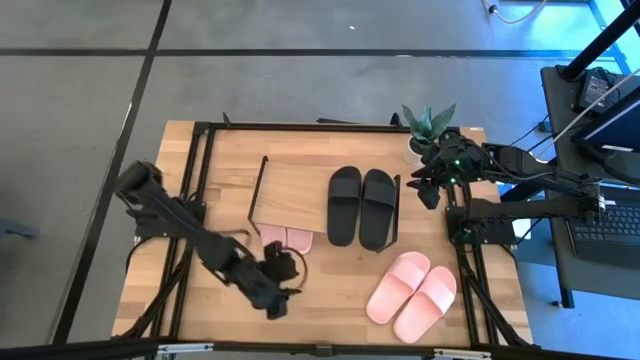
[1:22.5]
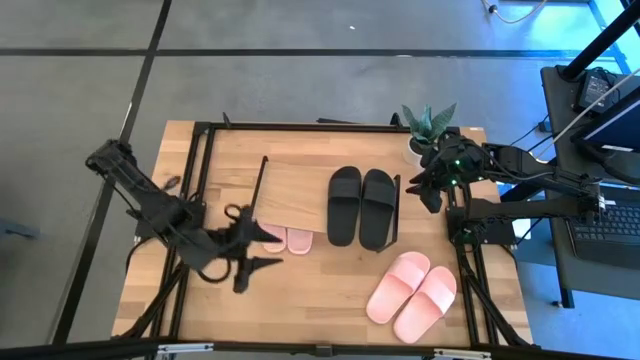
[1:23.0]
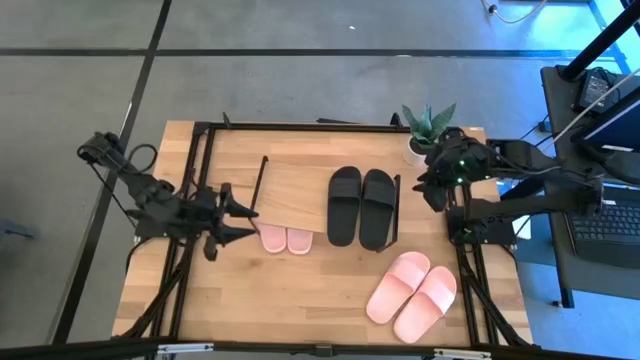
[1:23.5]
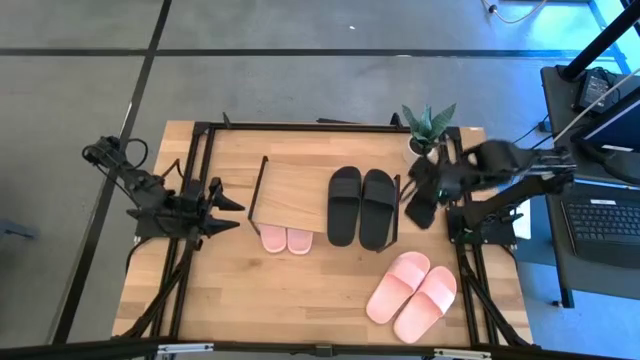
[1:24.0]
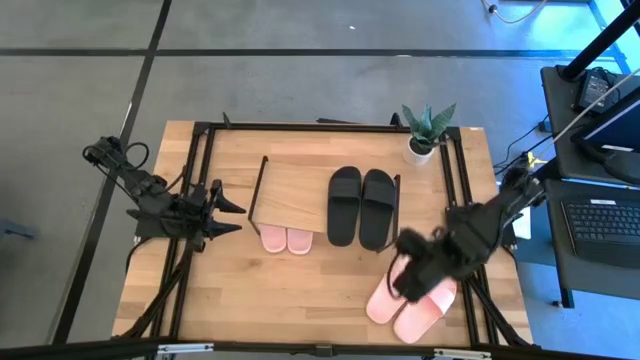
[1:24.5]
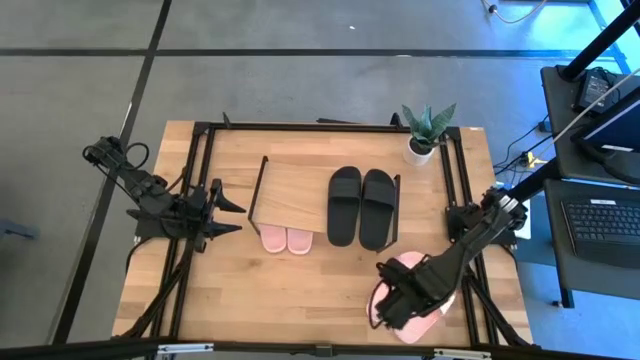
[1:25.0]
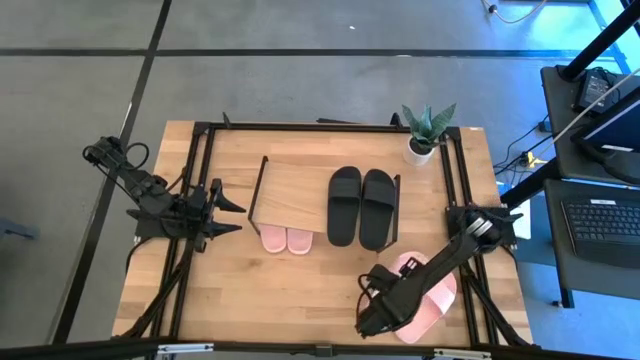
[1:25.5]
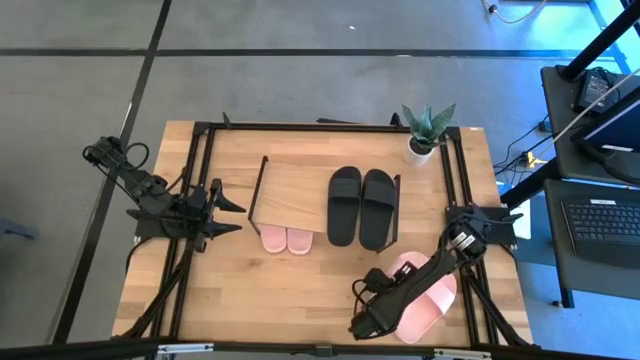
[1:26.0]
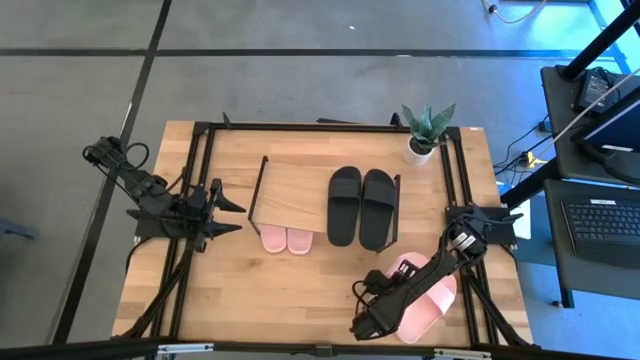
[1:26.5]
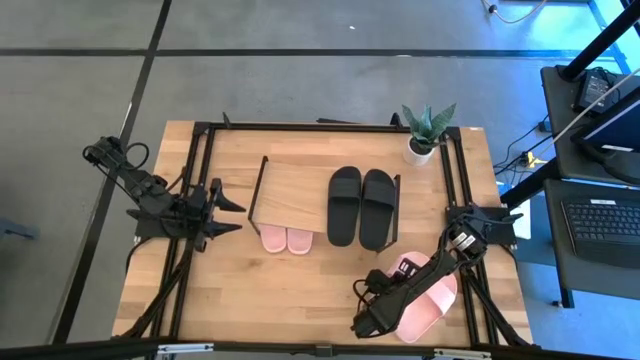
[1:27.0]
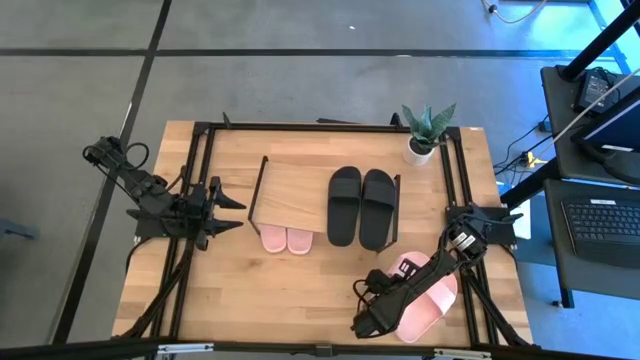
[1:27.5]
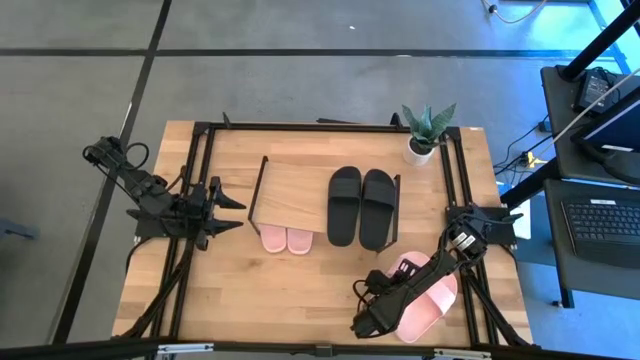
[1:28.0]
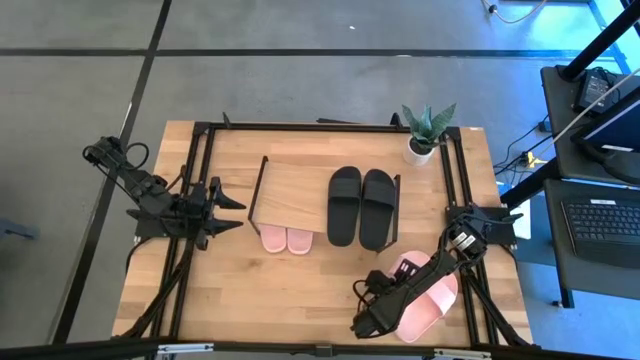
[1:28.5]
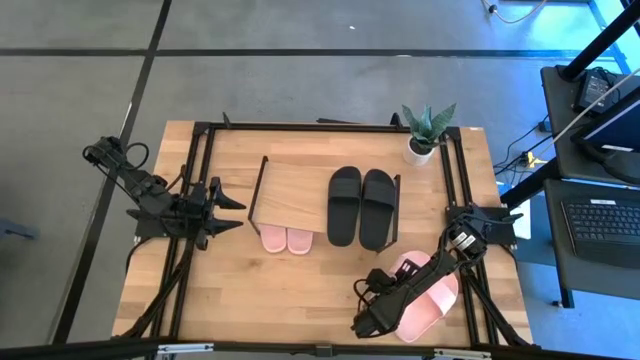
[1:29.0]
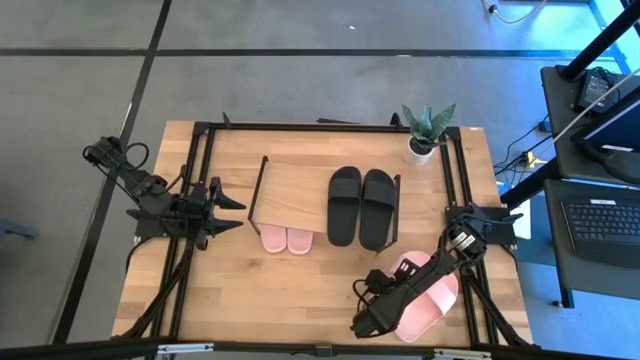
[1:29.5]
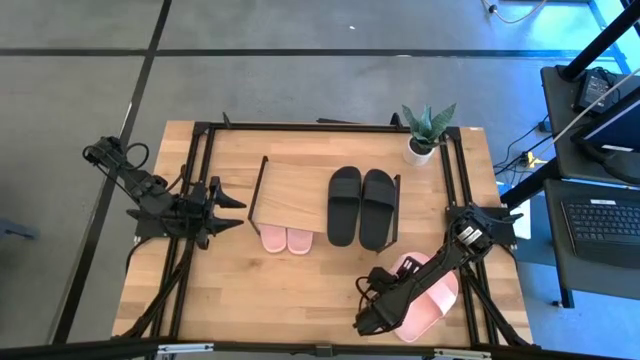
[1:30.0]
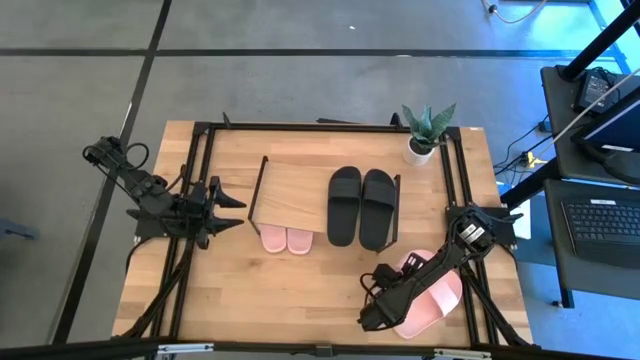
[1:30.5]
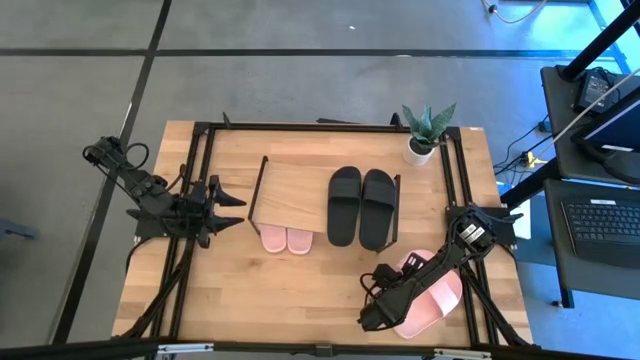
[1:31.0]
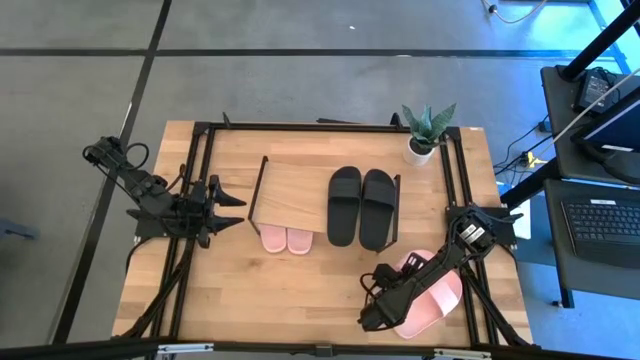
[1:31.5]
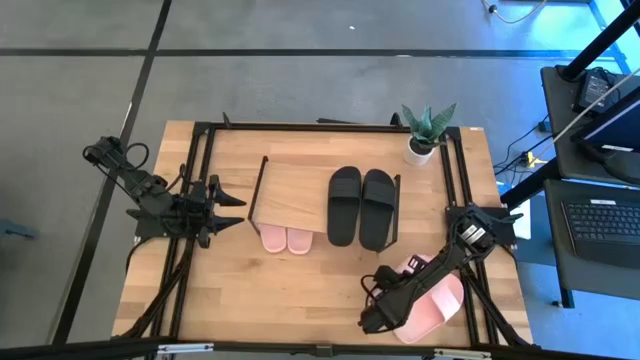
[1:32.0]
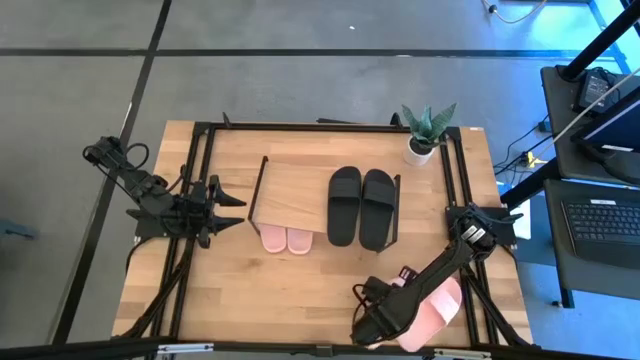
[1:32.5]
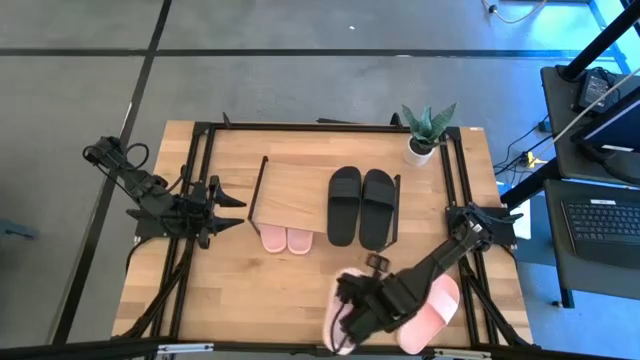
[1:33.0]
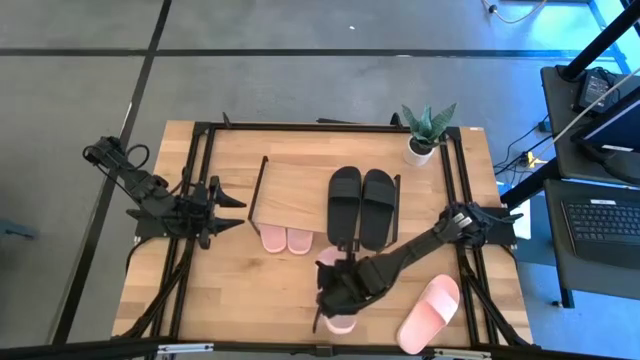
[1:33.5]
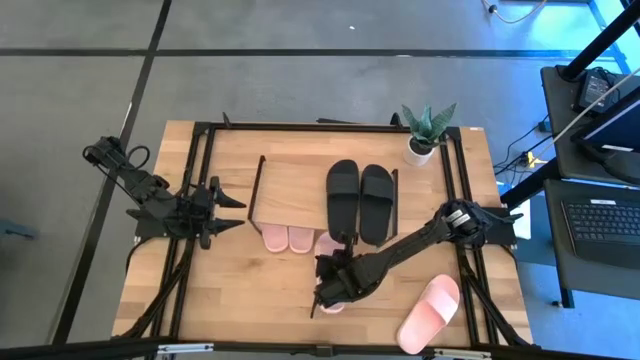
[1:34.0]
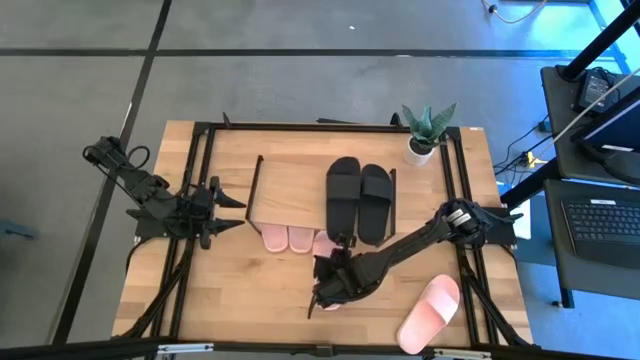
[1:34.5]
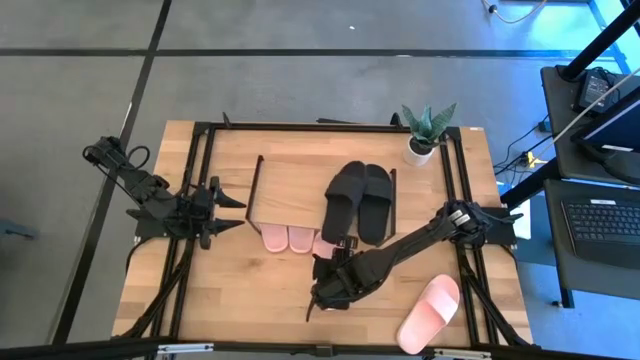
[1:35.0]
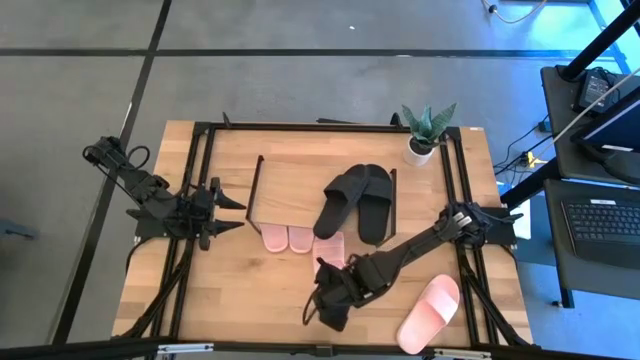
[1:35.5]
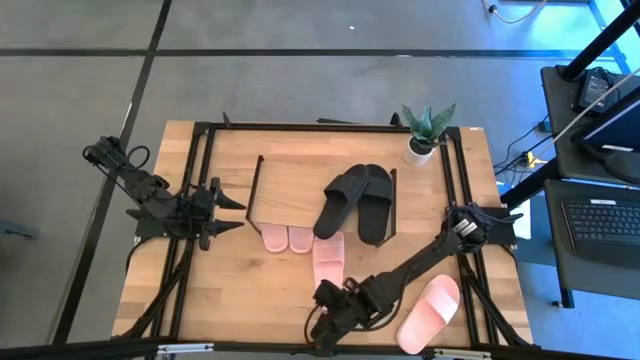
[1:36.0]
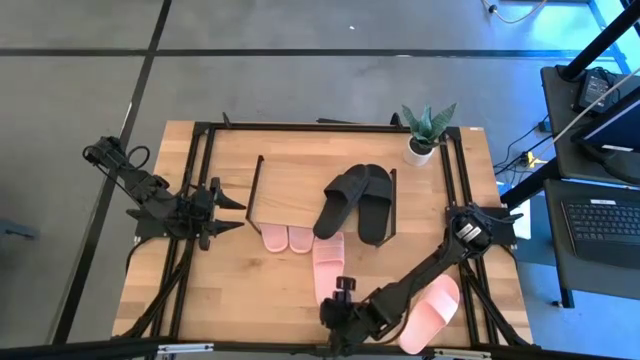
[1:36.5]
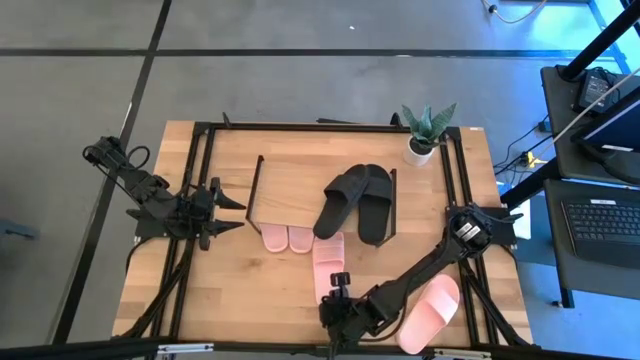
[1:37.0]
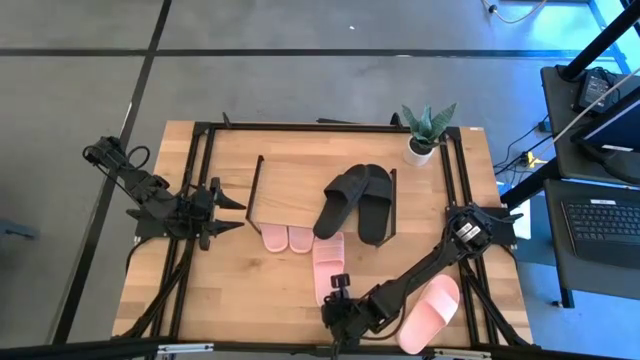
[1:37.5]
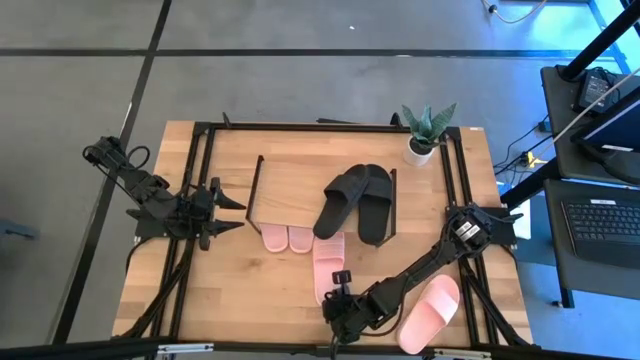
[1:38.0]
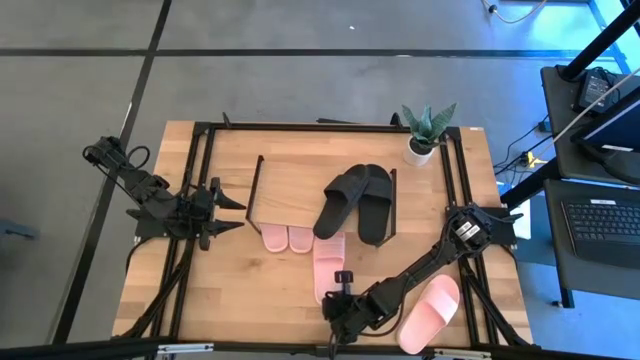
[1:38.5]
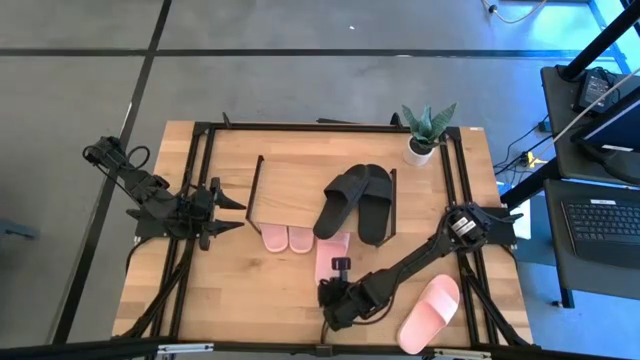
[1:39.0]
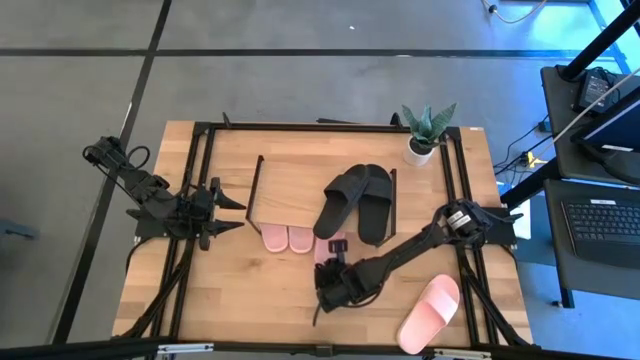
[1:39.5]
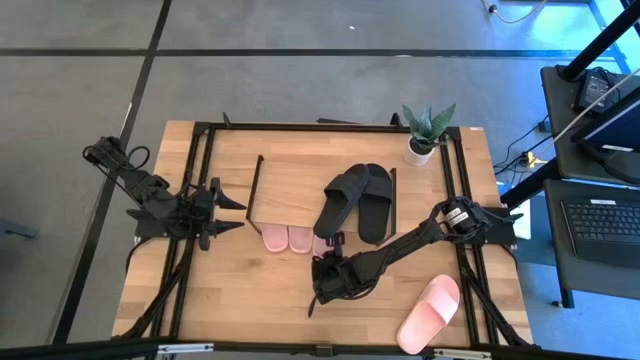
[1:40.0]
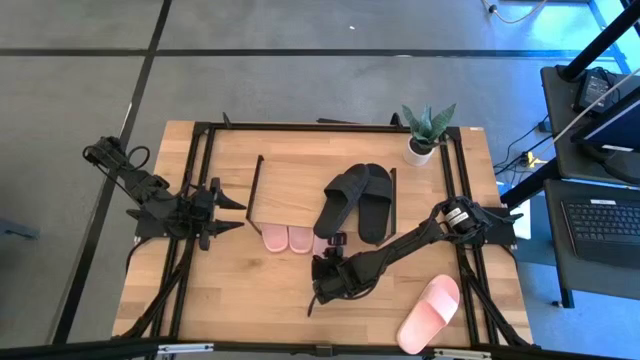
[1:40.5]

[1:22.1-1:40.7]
Task: Pick and place slides into the shelf
Put the left pink slides under the shelf

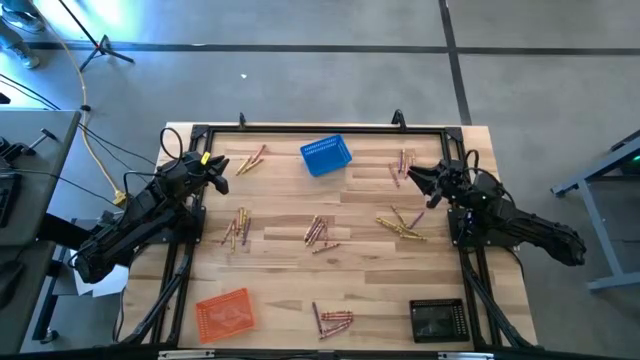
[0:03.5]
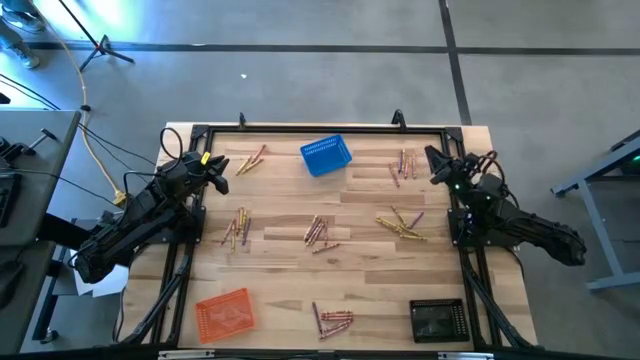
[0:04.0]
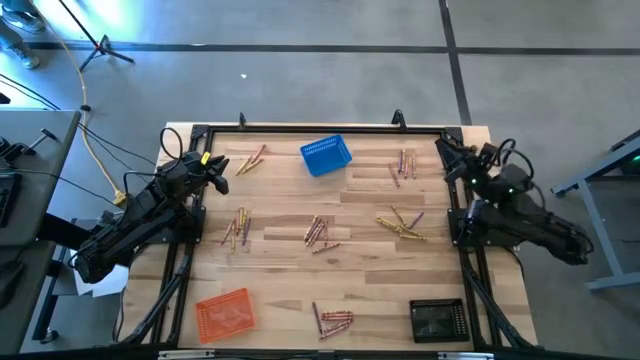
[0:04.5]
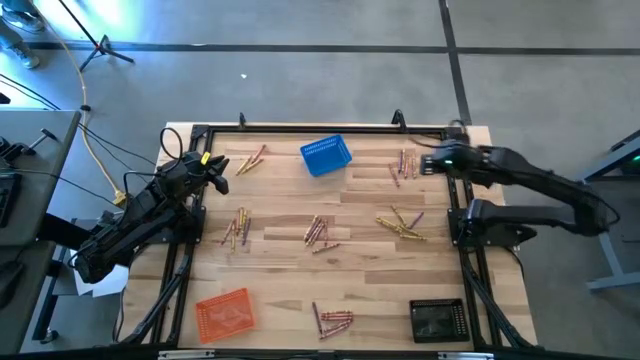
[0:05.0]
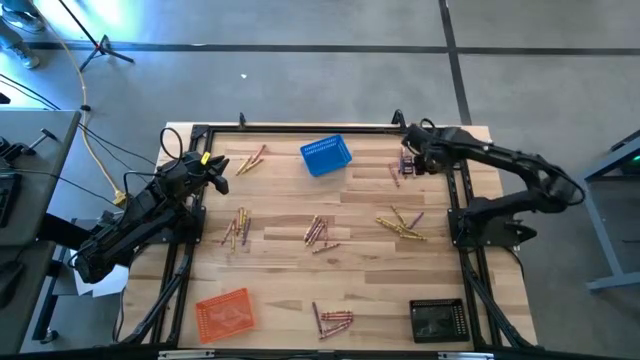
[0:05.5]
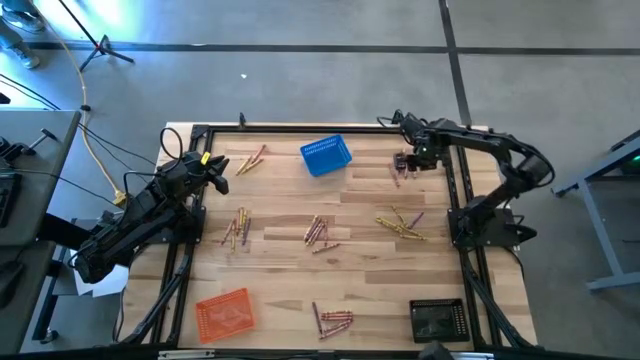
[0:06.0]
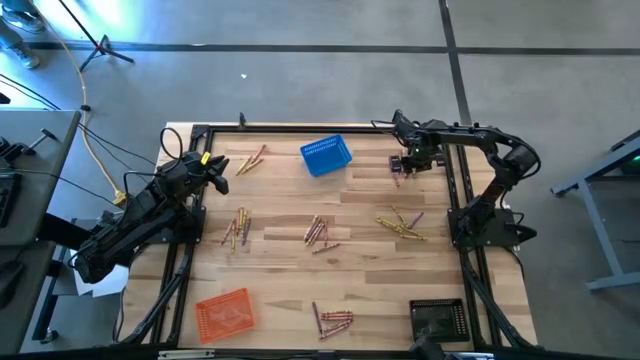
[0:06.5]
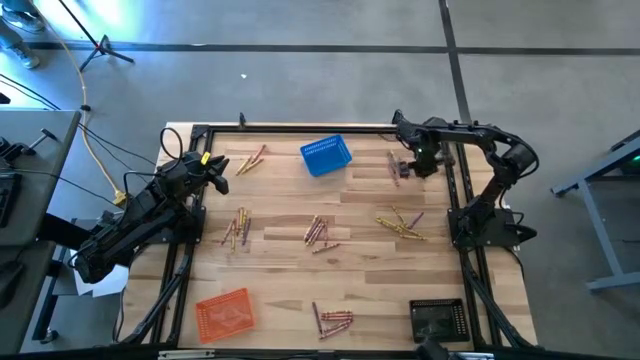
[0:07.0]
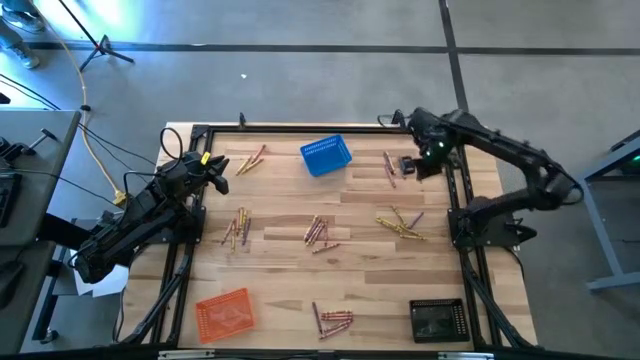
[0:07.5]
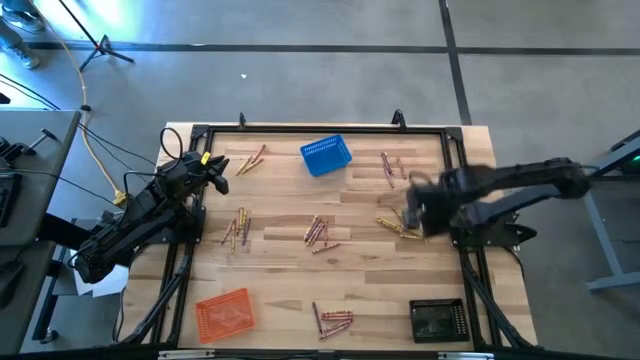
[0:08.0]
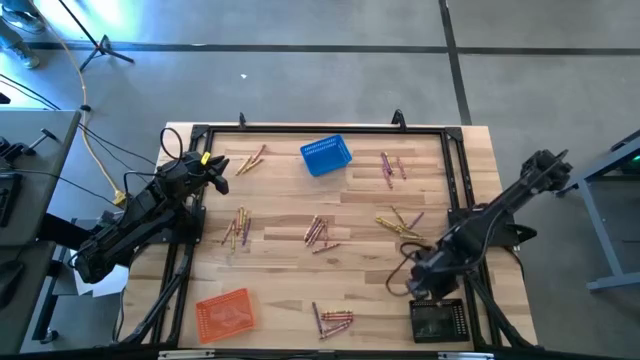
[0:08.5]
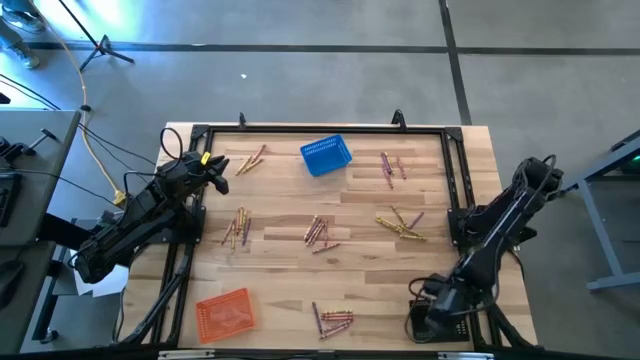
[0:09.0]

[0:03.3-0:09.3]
Task: Sort crayons
Put the yellow crayon into the black bin
